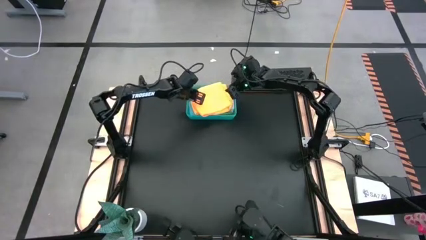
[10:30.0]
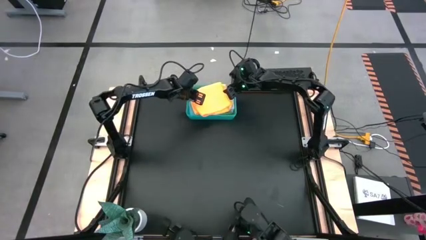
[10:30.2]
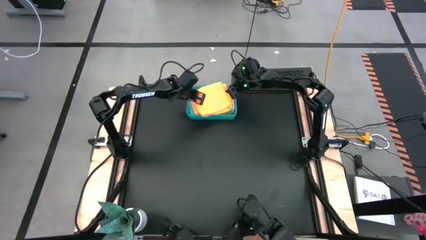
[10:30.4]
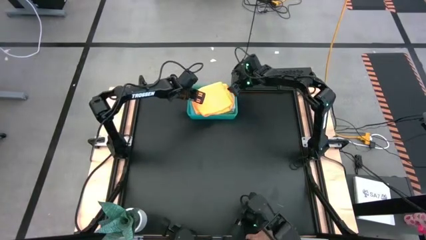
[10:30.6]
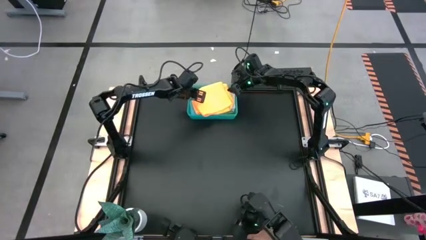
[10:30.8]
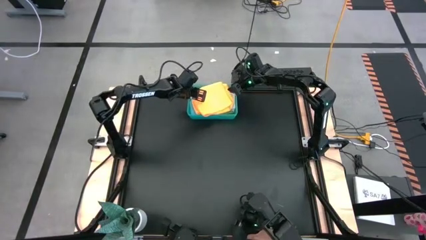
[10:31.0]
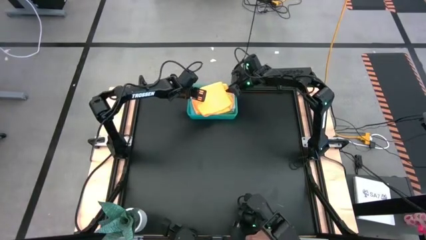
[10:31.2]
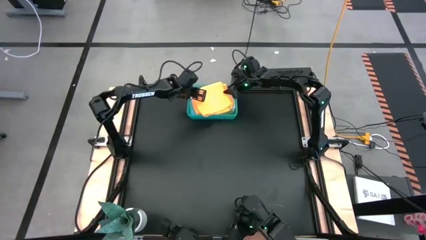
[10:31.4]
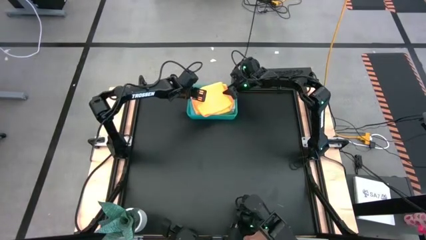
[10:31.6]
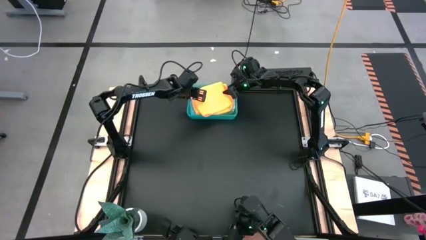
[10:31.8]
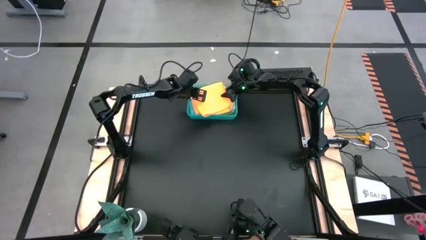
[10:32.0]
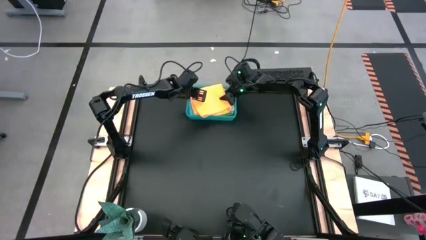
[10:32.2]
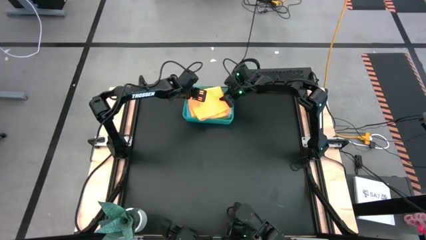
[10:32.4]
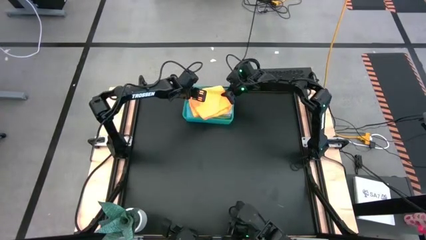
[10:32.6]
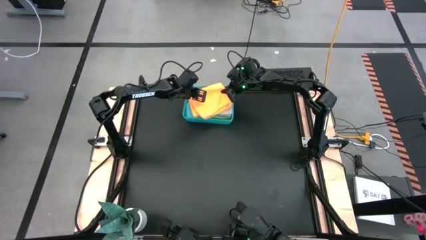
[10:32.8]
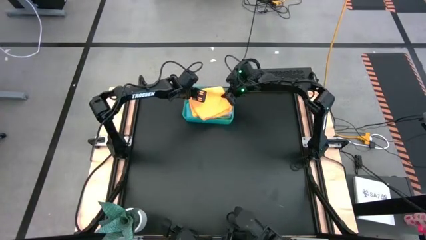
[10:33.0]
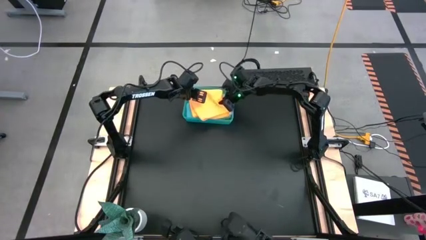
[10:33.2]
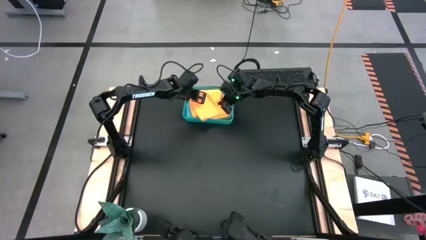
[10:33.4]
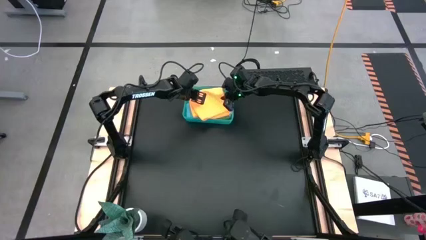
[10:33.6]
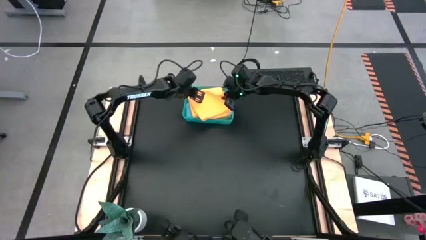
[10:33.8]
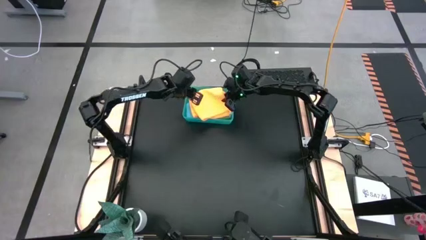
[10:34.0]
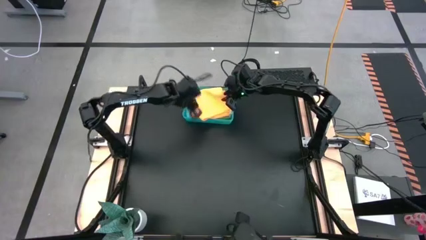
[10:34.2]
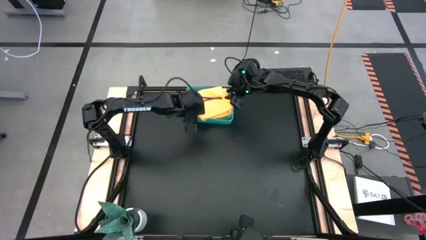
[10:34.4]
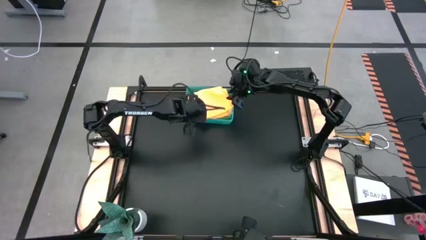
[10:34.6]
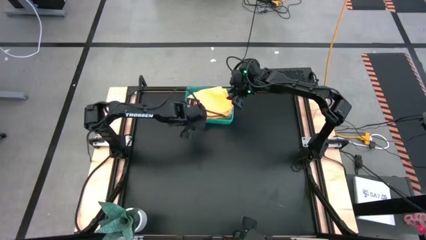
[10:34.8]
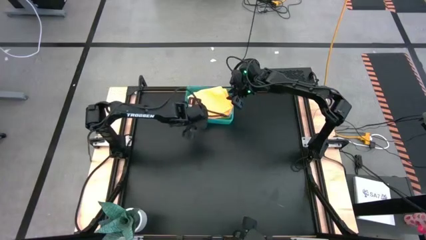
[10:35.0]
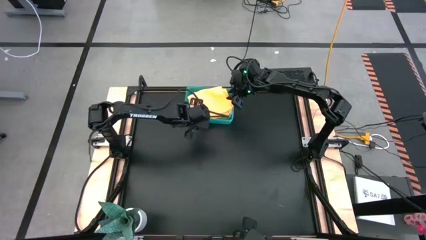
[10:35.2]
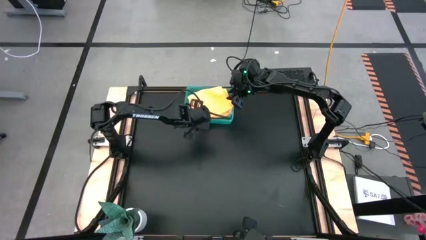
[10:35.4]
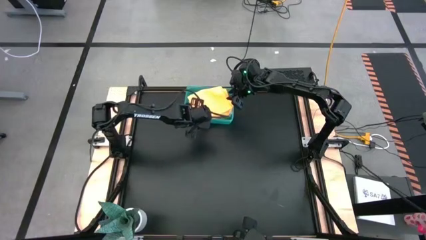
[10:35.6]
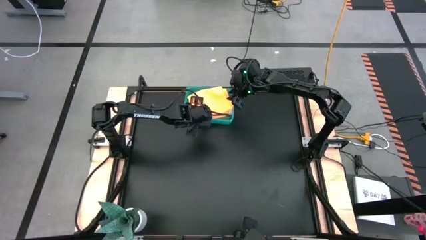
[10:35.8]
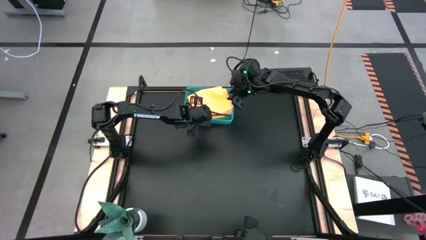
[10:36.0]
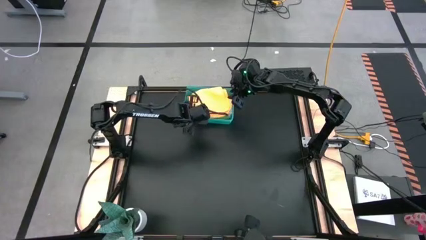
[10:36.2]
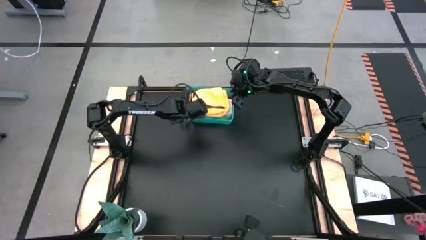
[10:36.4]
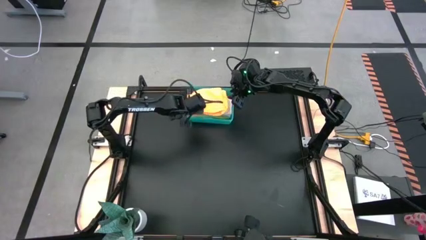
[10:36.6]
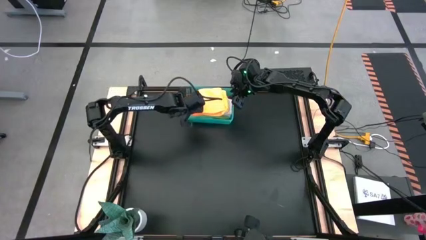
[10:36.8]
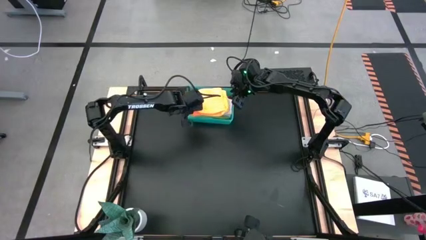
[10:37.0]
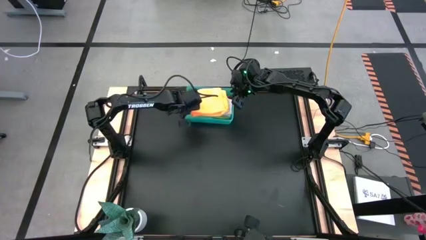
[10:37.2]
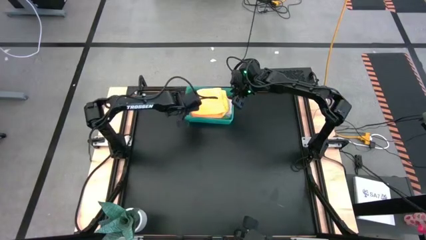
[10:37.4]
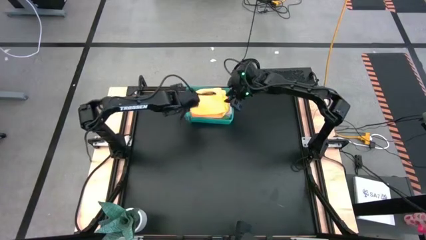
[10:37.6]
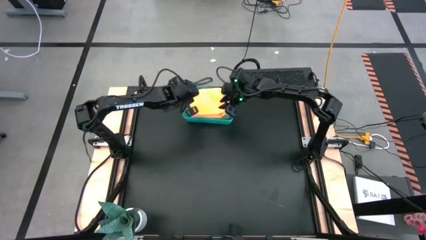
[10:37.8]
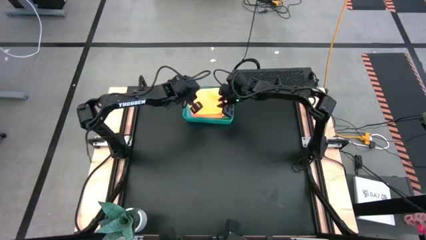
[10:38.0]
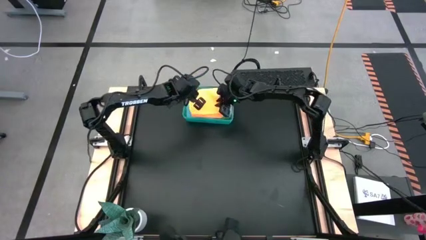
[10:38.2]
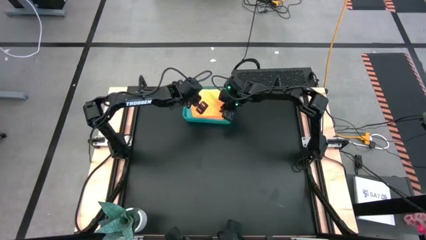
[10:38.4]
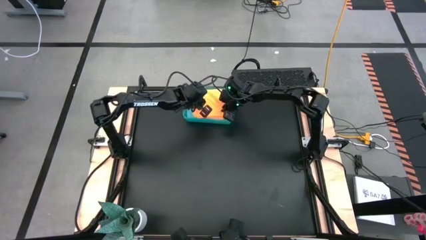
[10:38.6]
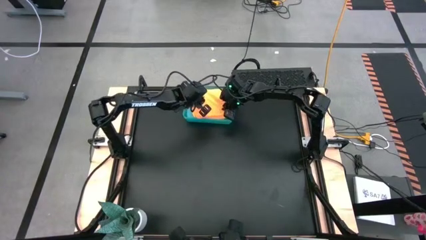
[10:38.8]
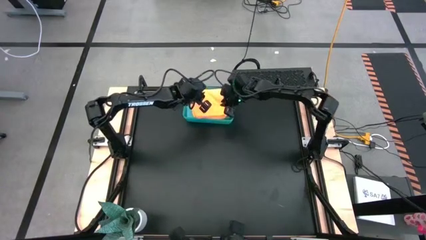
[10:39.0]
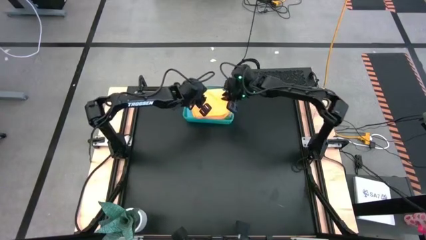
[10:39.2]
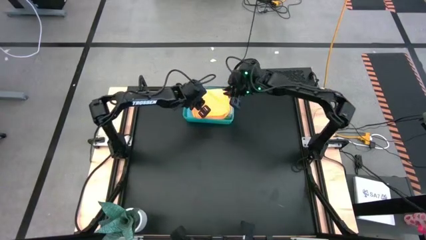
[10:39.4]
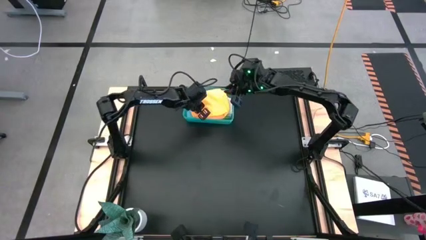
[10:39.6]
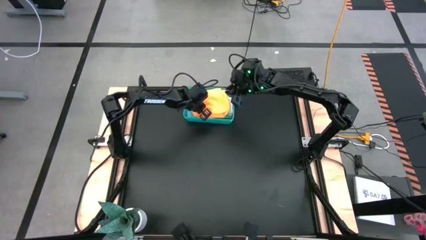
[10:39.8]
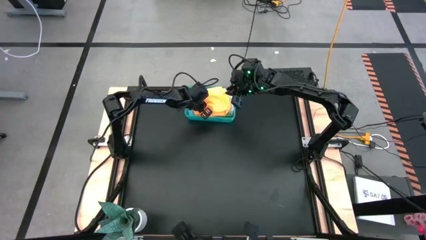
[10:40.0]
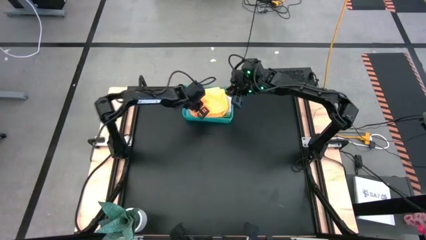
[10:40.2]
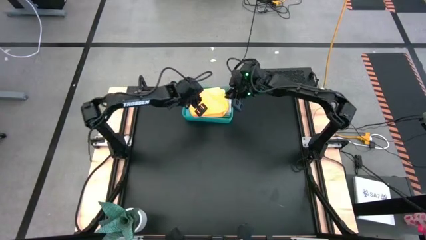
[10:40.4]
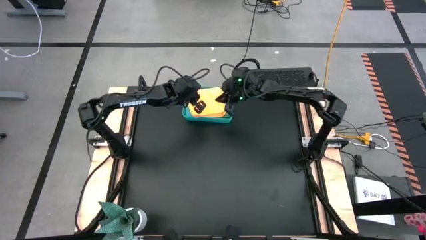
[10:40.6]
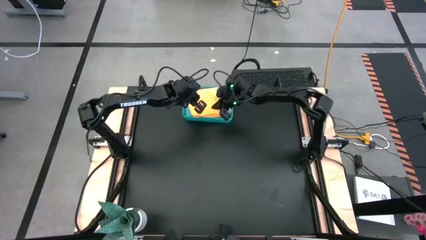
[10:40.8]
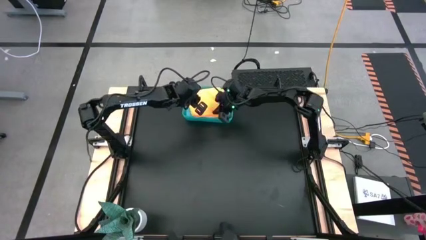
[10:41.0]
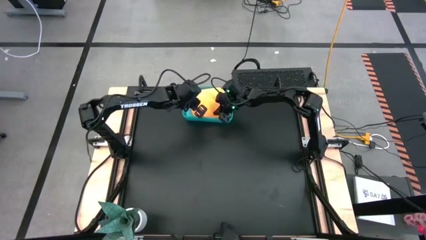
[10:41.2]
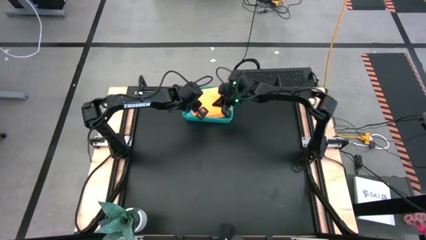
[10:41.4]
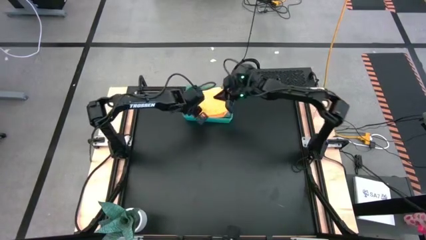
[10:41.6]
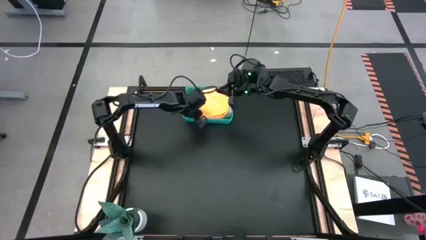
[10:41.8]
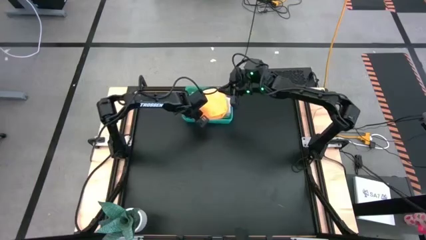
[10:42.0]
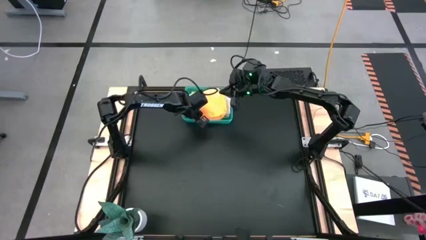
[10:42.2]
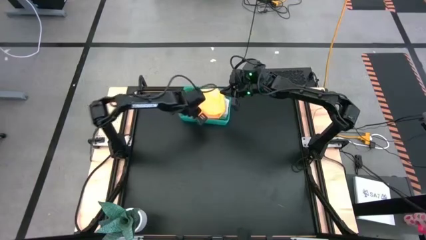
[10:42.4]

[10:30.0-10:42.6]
Task: Fold microfiber towels
Stack the folded orange microfiber towel on top of the gray towel into the bin

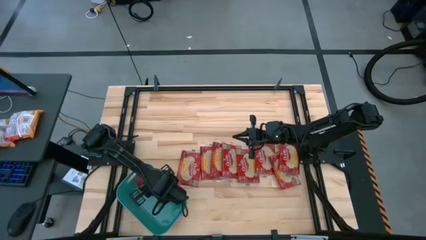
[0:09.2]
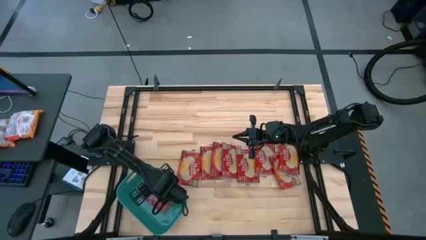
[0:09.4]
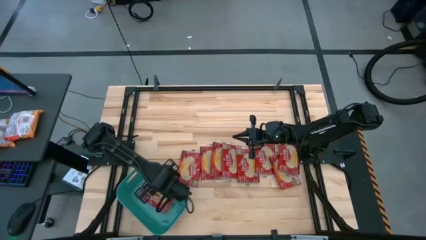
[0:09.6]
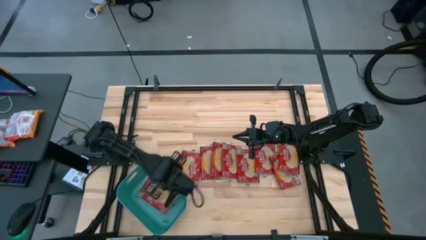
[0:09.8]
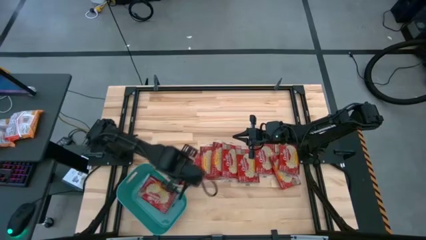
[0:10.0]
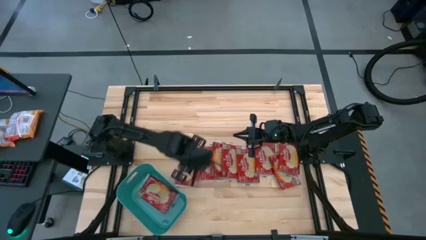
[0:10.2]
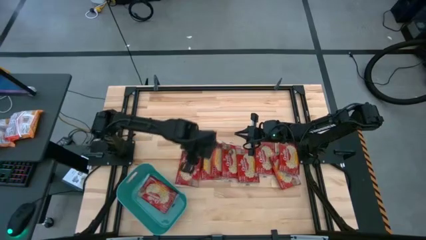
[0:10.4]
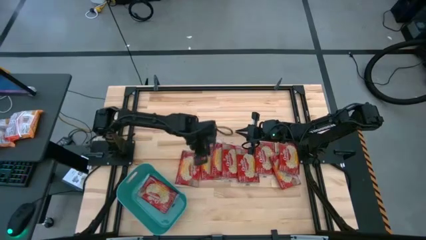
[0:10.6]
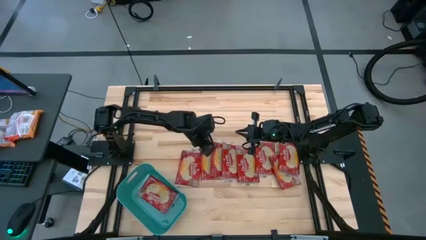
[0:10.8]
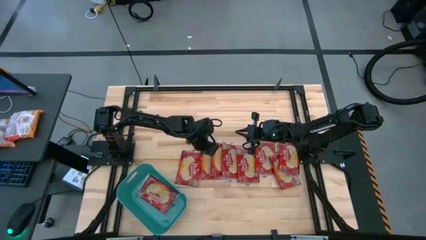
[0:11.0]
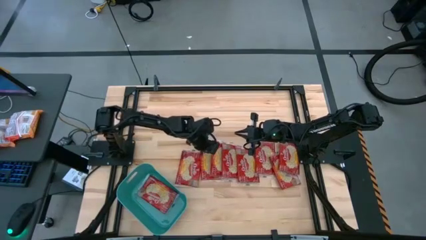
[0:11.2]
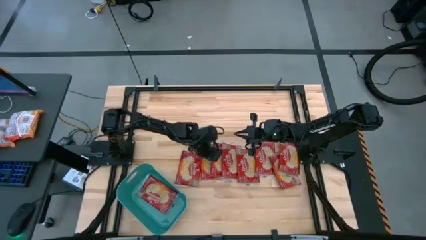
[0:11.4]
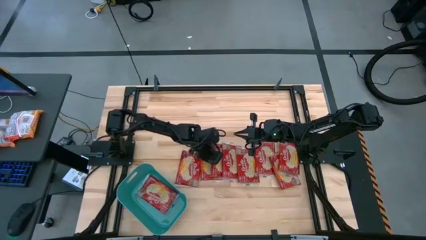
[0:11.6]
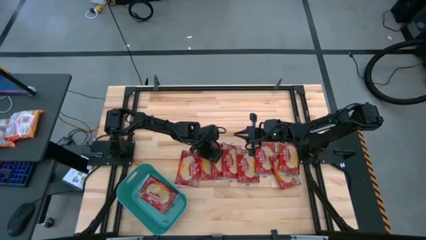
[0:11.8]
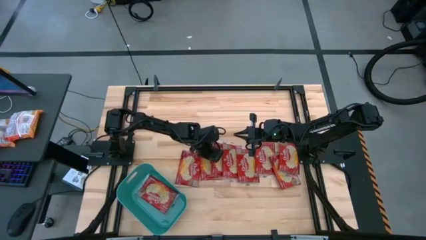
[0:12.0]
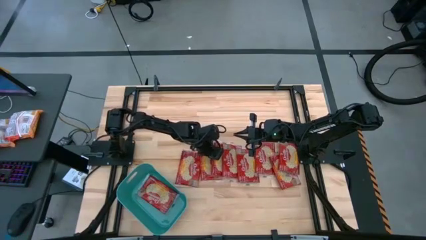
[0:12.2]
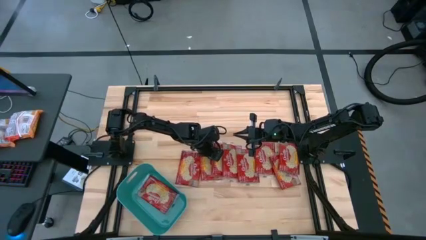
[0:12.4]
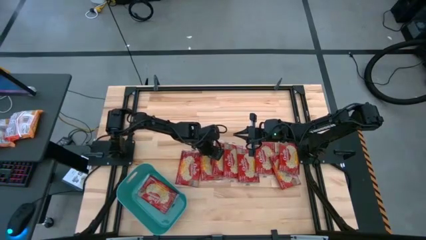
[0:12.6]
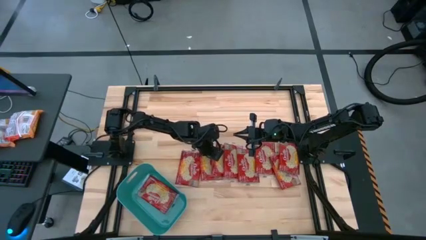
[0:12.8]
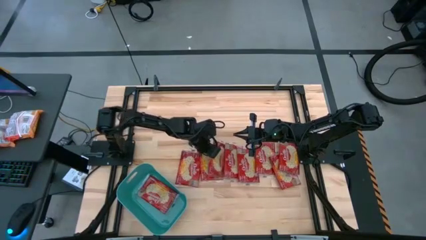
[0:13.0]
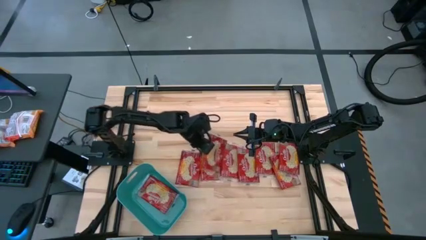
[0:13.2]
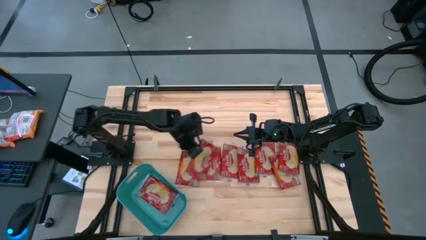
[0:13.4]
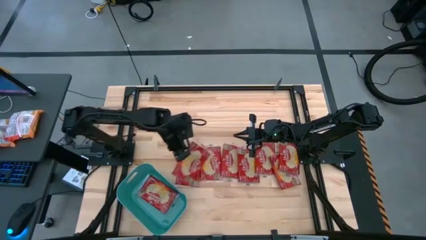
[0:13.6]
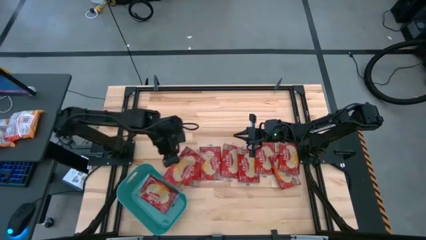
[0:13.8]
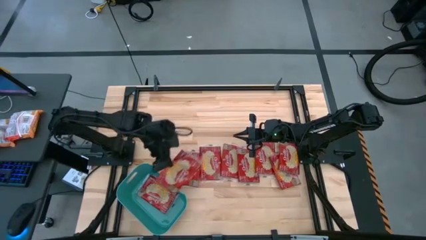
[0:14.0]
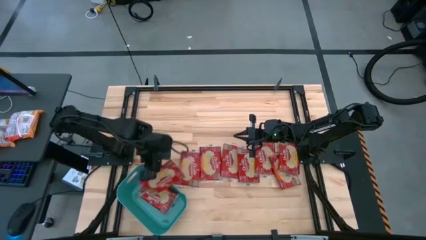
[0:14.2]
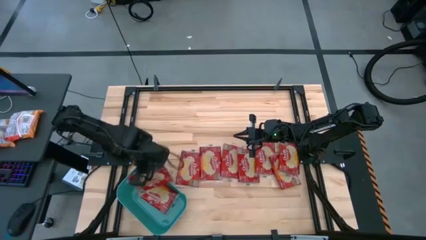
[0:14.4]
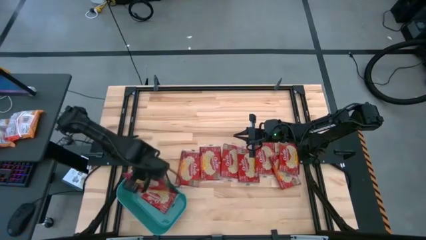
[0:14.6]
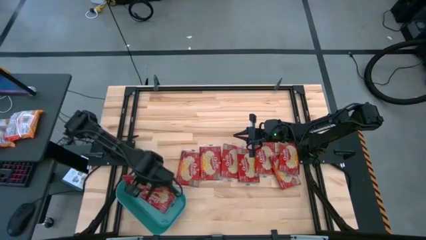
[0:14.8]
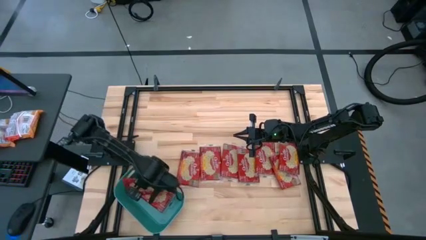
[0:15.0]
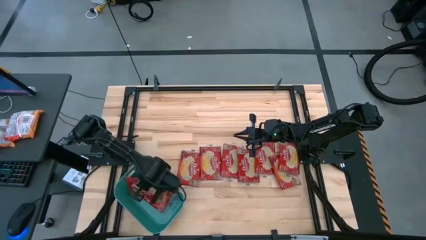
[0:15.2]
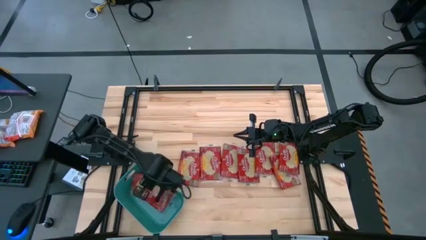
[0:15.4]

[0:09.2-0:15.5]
Task: Sort popcorn bags into baskets
Put the popcorn bag into the blue bin
